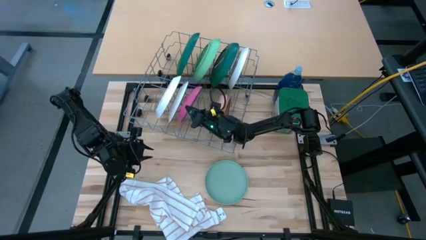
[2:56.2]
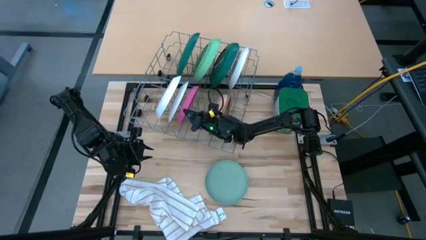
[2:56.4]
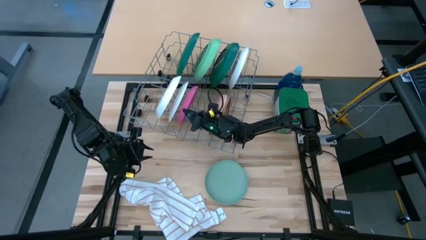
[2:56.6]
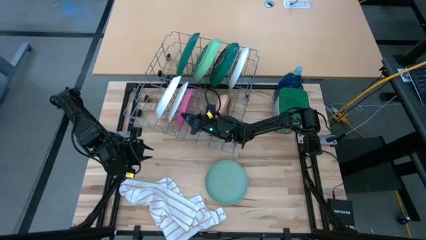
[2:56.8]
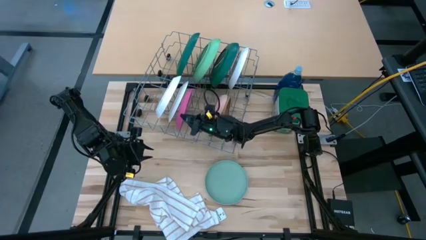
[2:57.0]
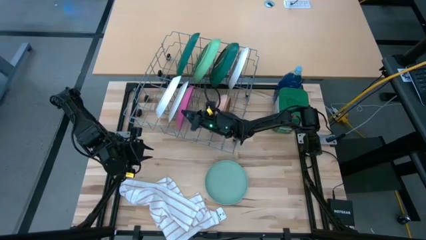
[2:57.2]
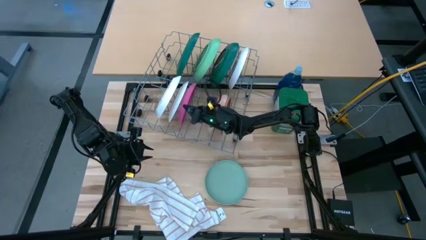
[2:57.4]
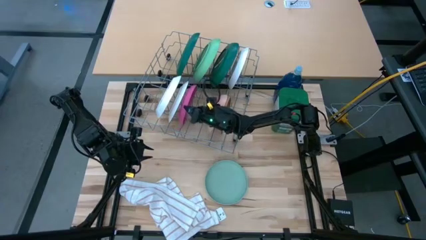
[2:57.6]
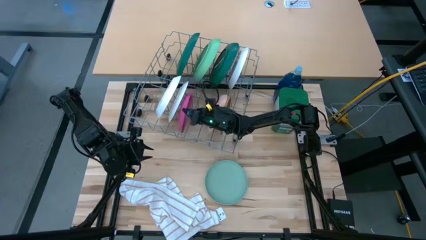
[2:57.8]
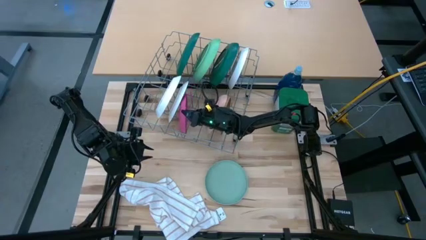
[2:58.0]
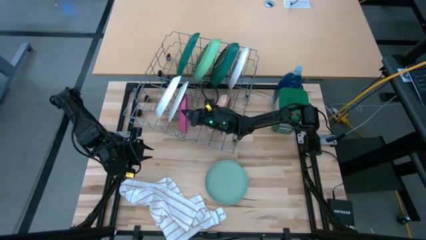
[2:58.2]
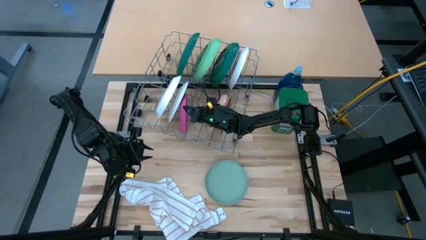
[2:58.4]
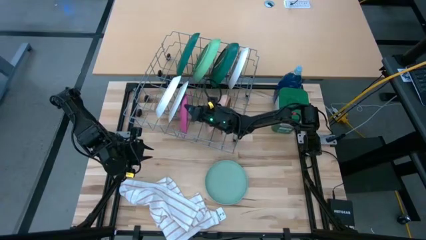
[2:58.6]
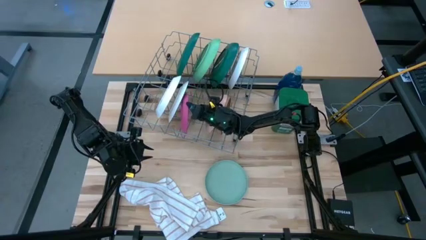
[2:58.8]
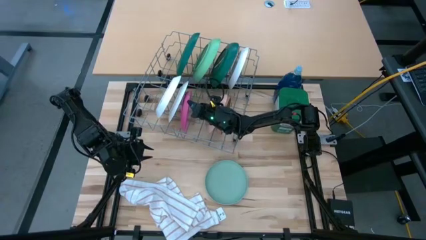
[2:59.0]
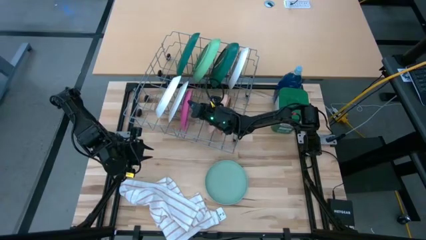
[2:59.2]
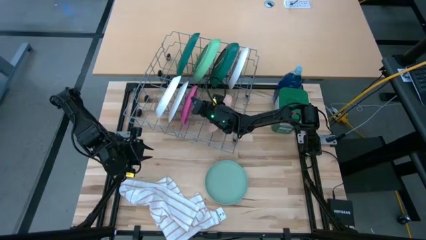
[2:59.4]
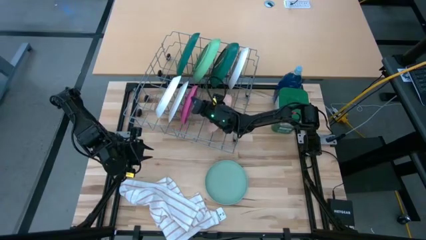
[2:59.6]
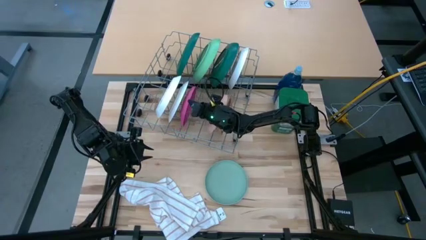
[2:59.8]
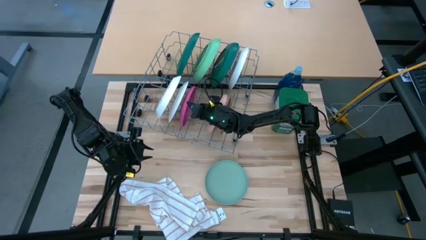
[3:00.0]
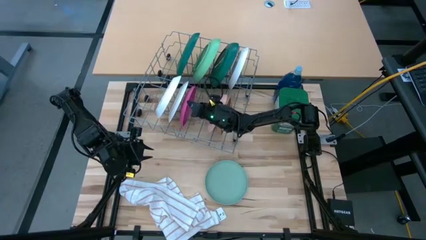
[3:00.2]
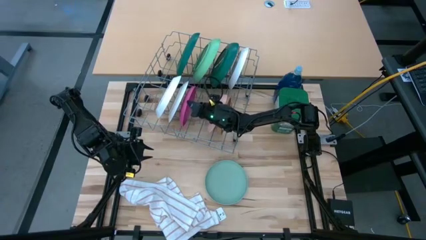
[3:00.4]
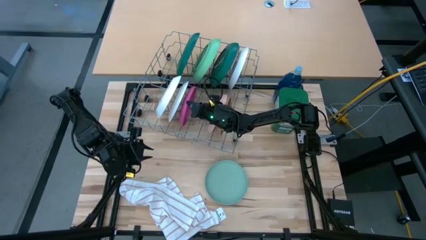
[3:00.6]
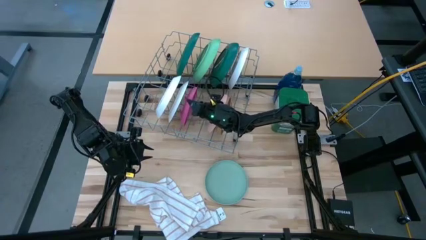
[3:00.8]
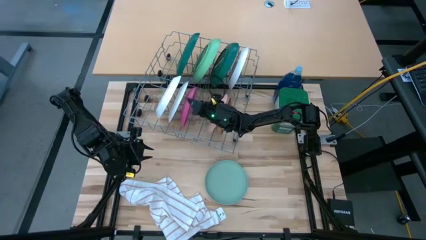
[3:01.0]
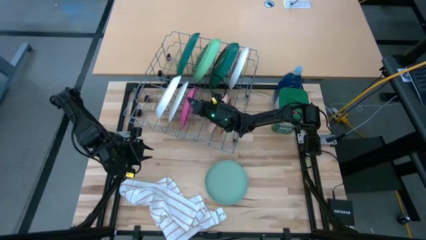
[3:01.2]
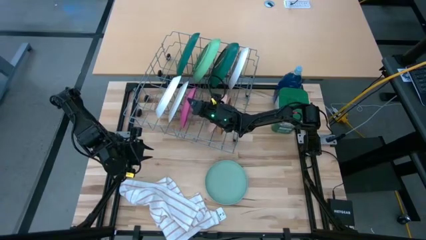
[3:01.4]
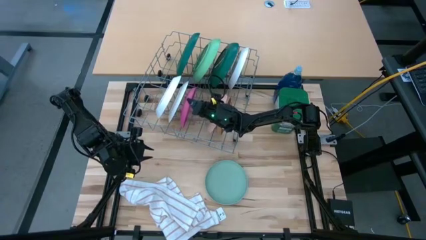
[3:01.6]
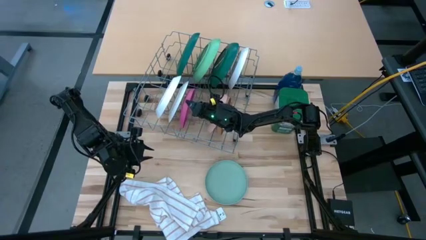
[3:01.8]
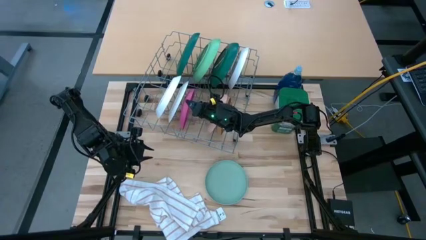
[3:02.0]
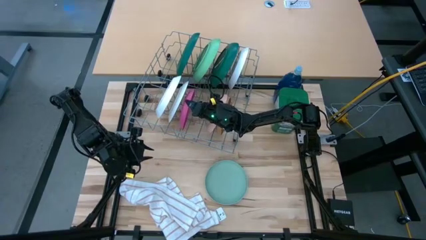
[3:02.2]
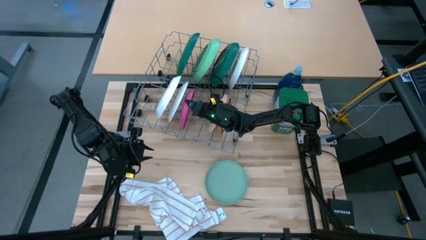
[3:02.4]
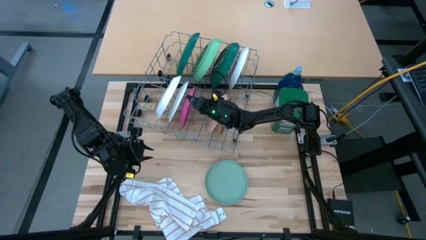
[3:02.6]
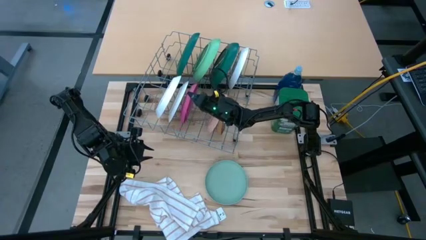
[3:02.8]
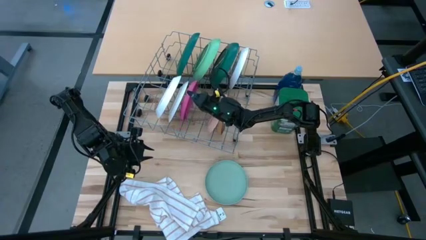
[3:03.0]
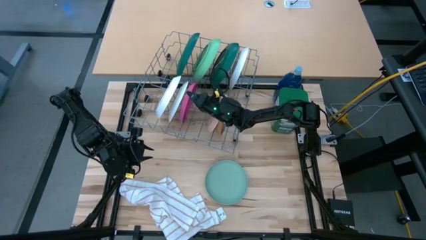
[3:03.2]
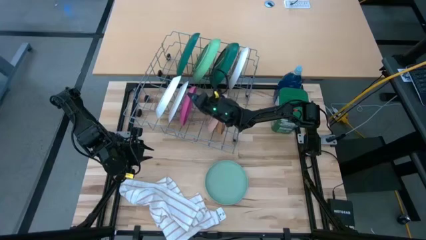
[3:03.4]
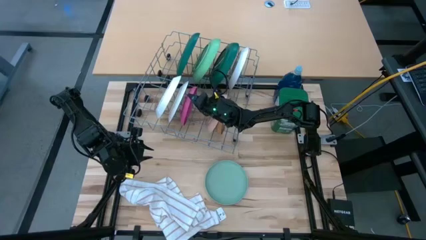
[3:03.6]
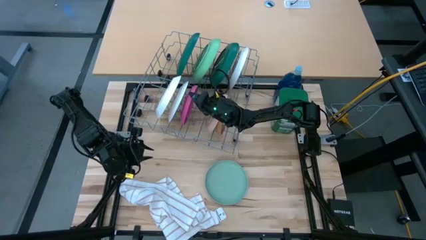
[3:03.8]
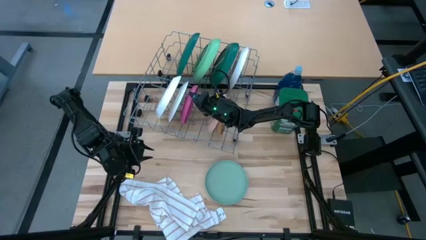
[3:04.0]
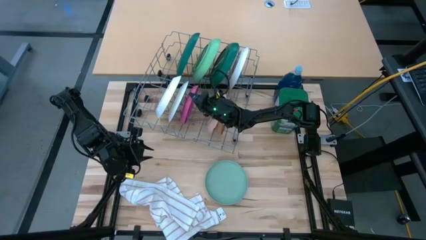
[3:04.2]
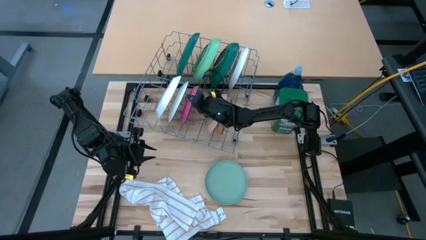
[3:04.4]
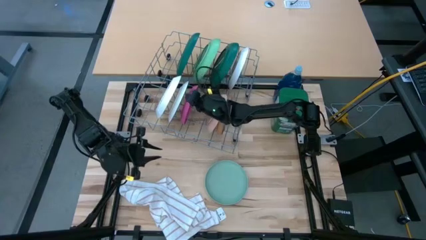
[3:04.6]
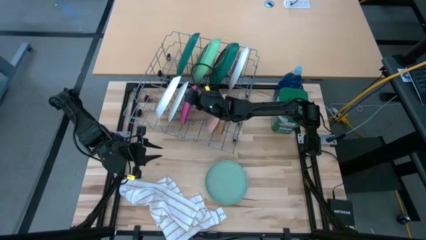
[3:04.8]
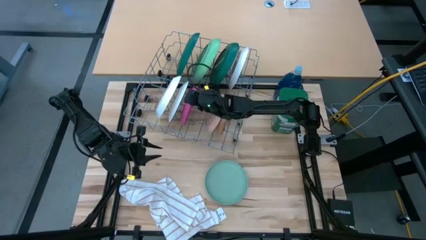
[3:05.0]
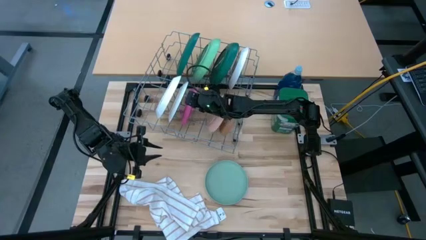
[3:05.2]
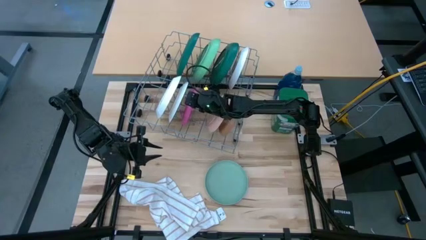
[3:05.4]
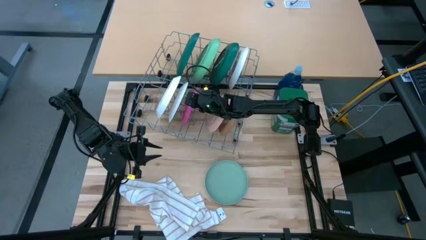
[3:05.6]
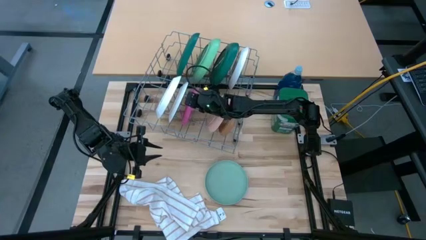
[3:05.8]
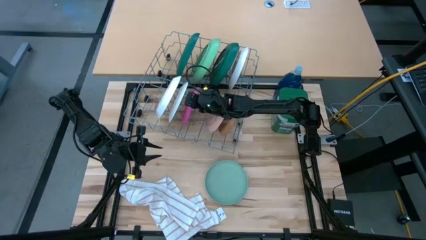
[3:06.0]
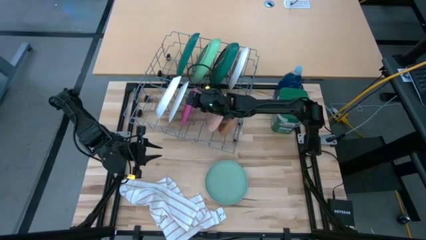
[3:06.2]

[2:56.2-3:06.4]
Task: Sort dishes
Put the pink plate in the dish rack

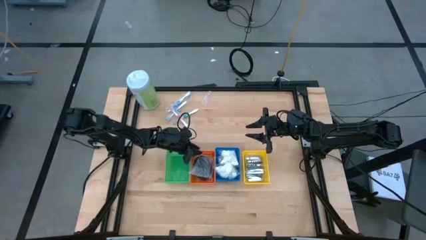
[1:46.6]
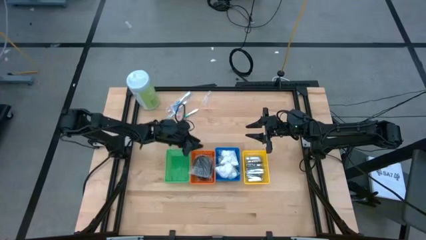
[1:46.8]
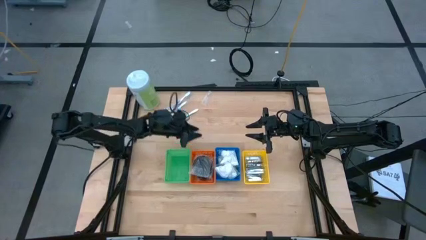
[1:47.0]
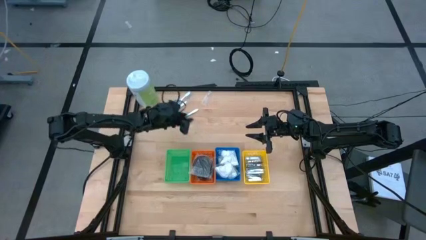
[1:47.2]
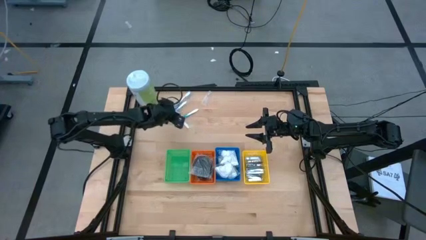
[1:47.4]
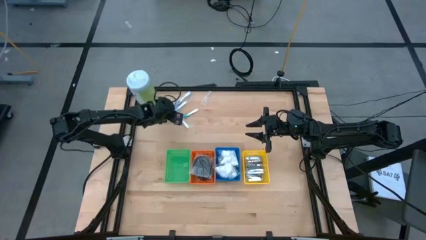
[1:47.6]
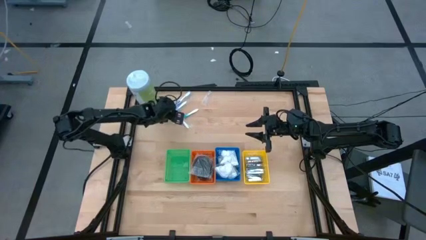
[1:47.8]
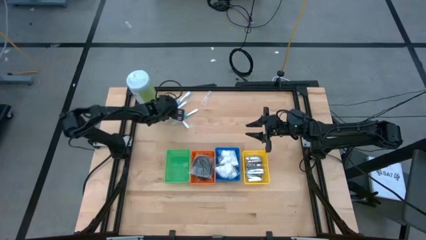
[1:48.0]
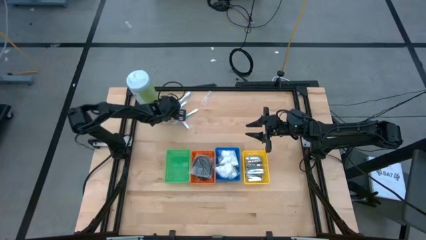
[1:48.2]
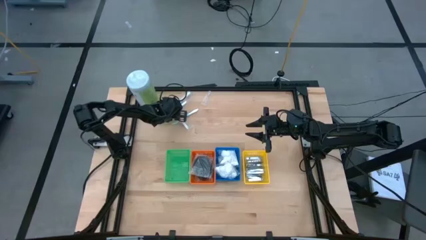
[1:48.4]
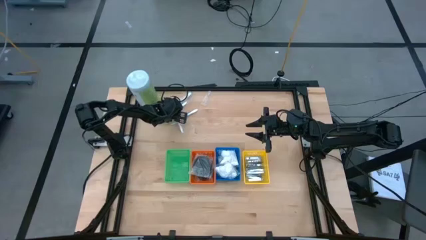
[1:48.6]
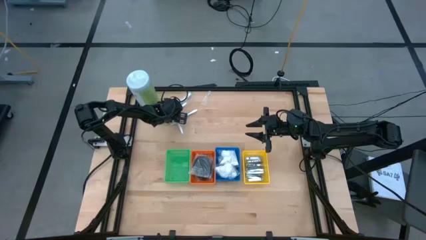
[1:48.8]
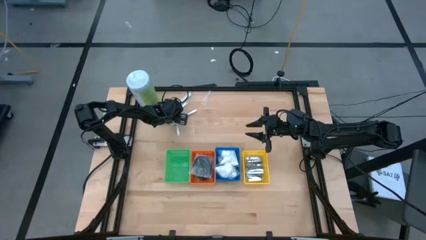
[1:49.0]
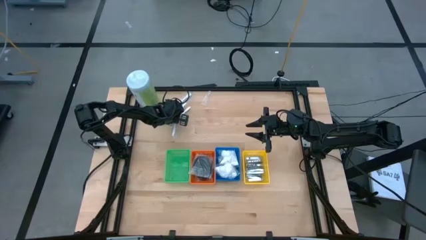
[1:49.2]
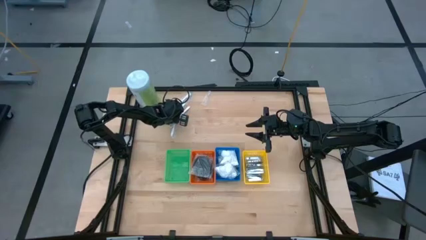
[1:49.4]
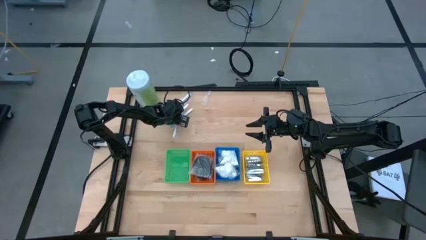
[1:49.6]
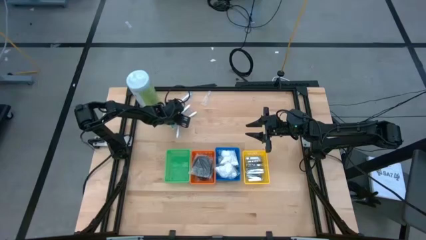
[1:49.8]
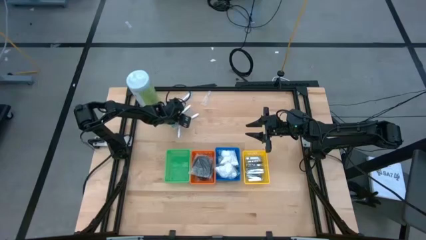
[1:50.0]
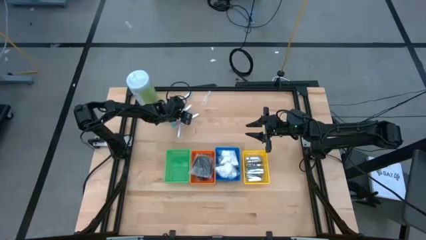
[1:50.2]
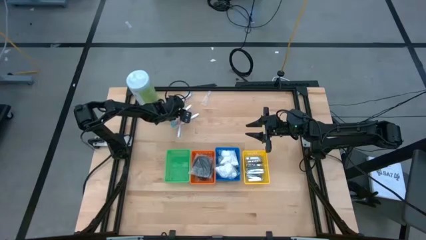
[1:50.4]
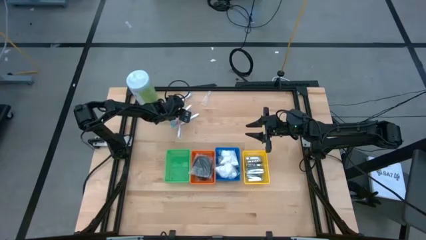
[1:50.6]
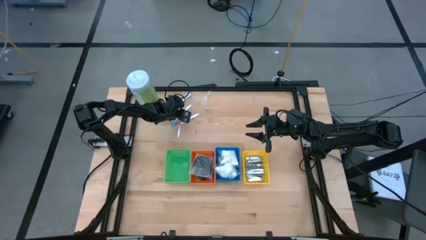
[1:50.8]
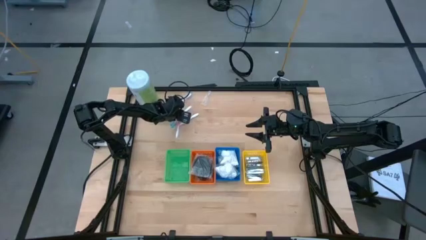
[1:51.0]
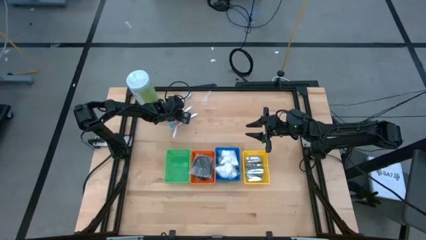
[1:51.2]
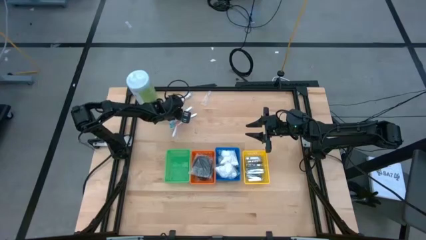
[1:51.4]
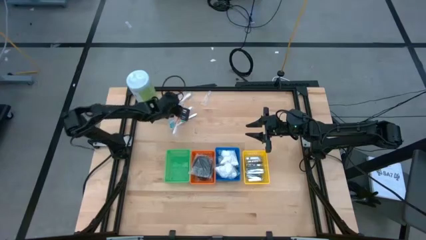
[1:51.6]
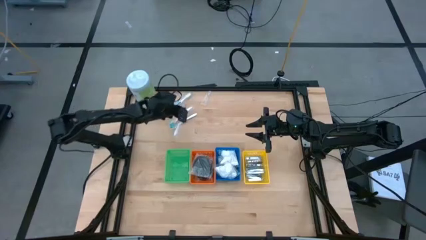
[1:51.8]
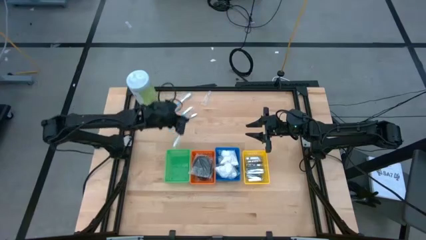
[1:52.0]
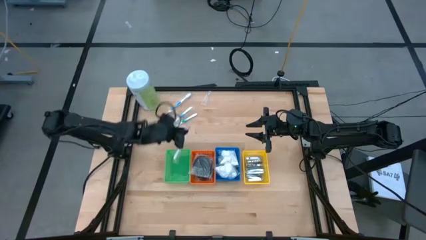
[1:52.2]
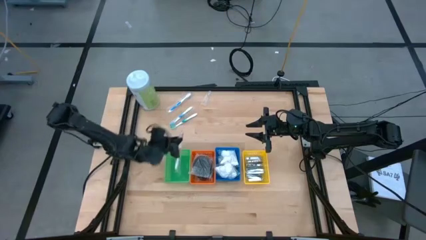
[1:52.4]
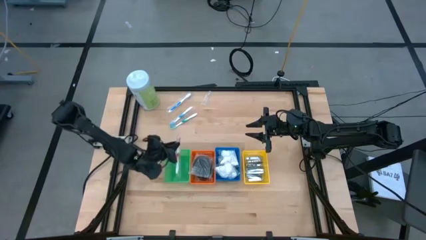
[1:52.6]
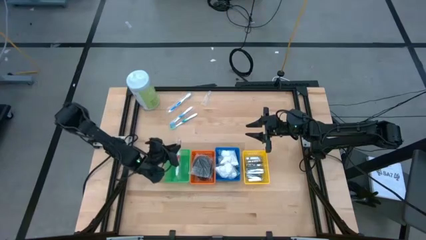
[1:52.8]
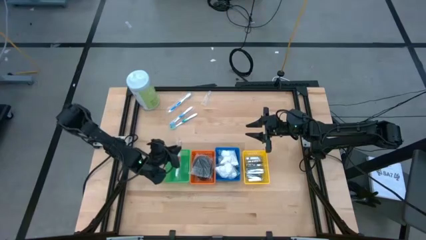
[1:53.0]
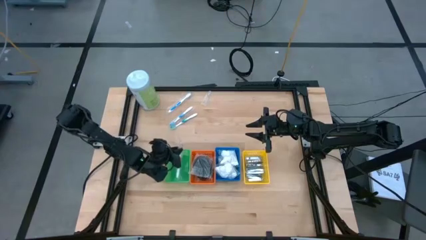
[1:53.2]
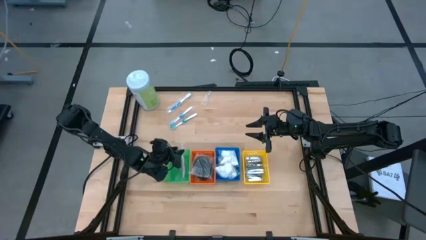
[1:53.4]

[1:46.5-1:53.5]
Task: Pick & Place Travel size toiletries
Put the orange toothbrush into the green basket
